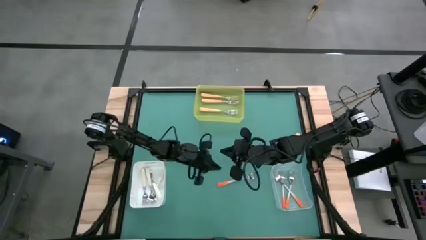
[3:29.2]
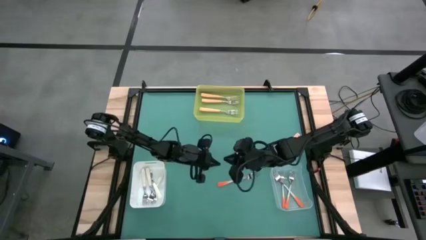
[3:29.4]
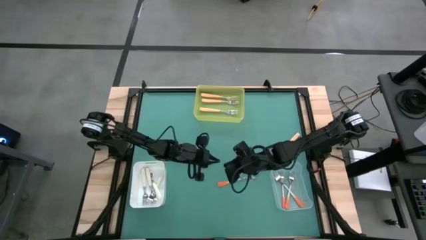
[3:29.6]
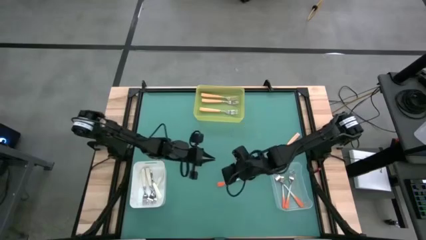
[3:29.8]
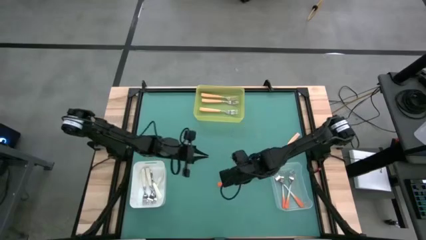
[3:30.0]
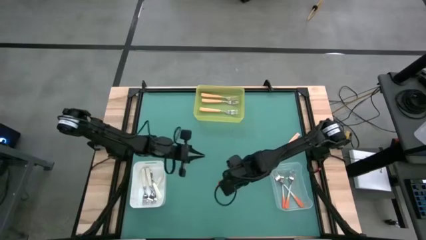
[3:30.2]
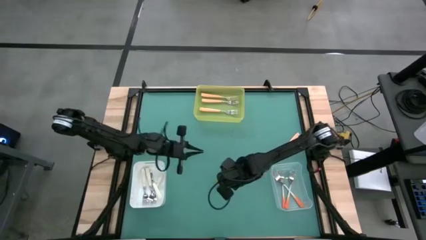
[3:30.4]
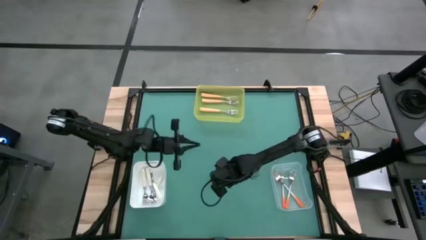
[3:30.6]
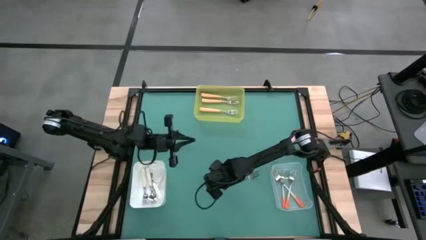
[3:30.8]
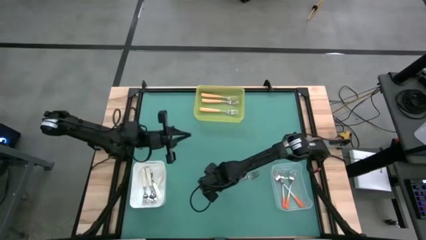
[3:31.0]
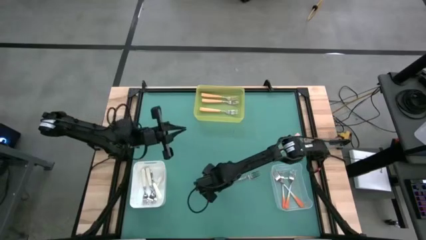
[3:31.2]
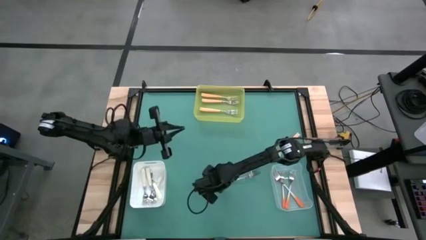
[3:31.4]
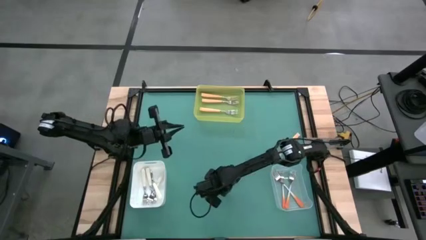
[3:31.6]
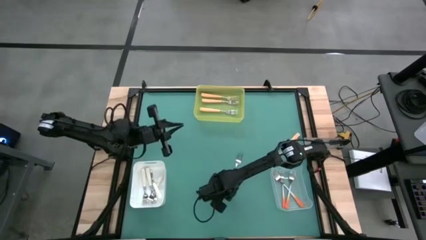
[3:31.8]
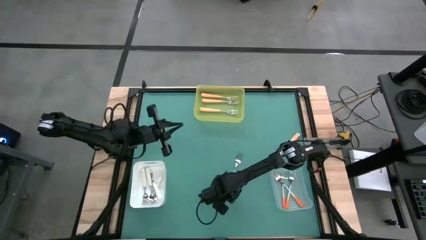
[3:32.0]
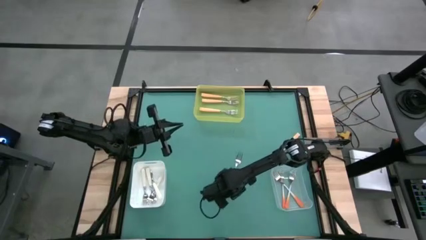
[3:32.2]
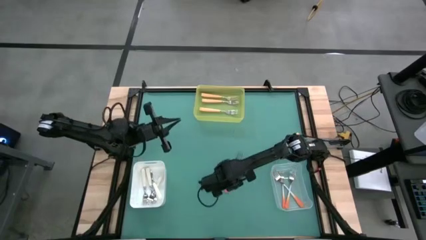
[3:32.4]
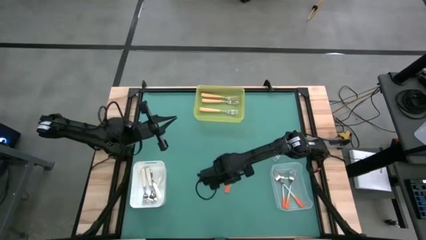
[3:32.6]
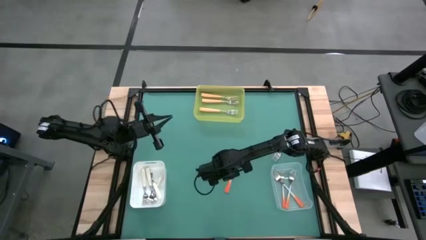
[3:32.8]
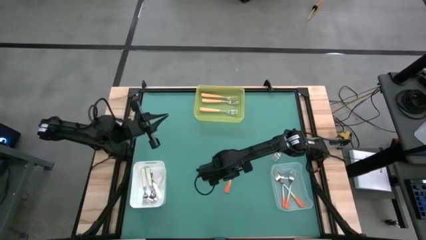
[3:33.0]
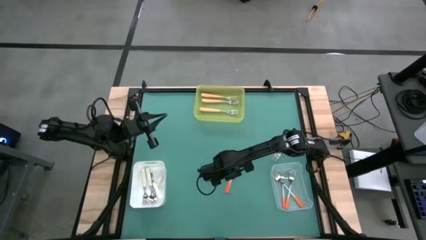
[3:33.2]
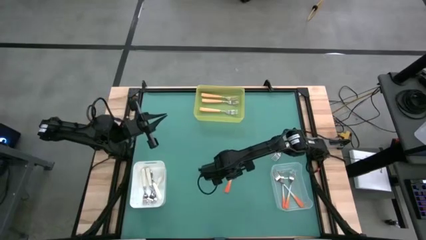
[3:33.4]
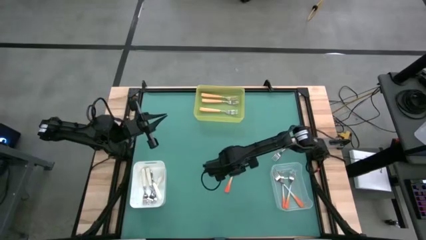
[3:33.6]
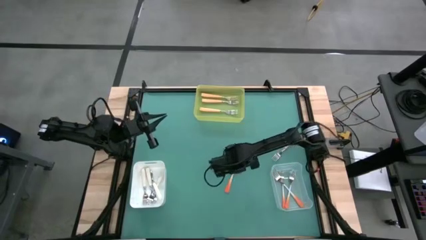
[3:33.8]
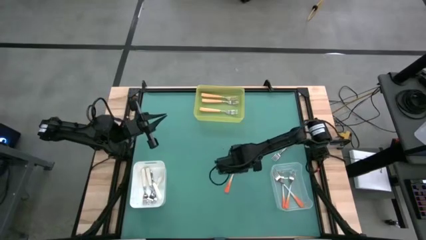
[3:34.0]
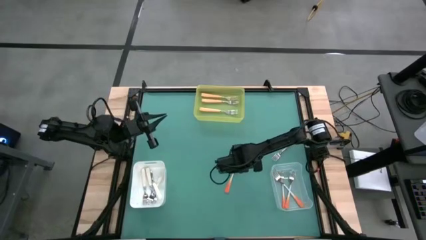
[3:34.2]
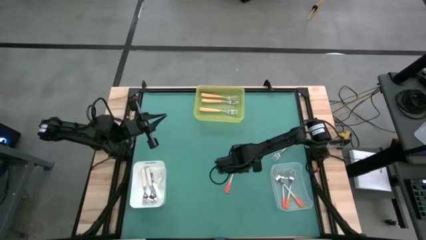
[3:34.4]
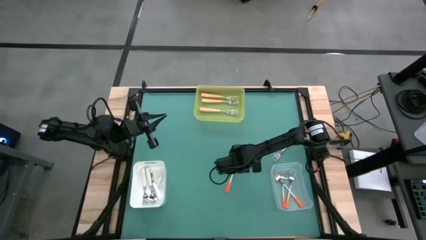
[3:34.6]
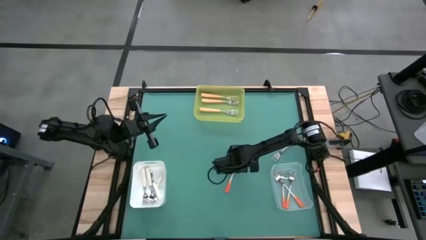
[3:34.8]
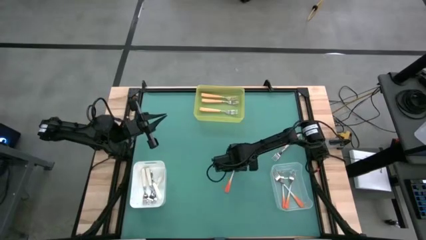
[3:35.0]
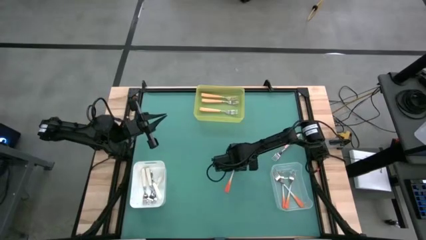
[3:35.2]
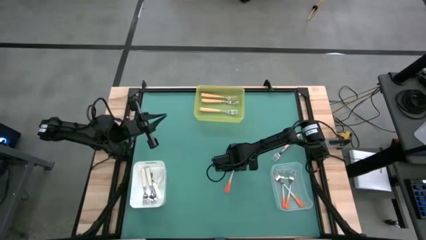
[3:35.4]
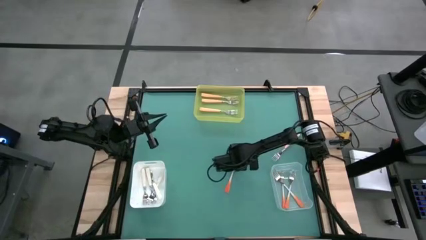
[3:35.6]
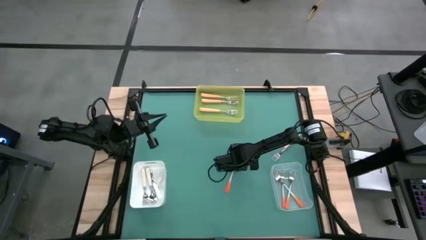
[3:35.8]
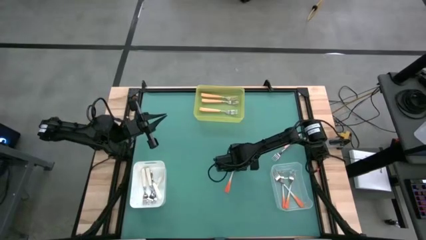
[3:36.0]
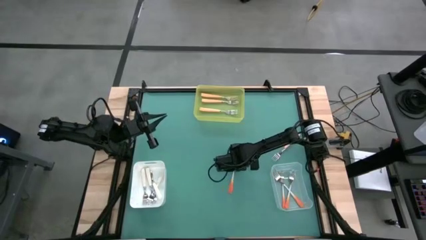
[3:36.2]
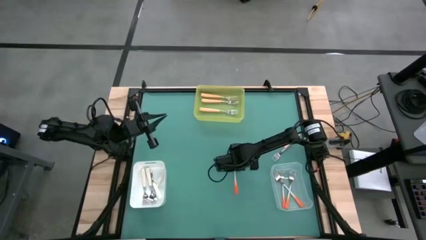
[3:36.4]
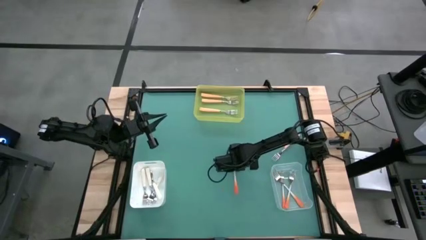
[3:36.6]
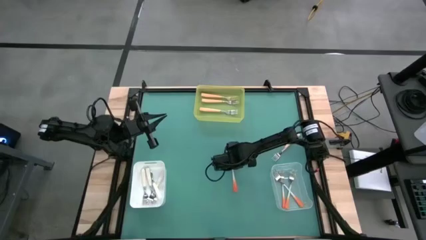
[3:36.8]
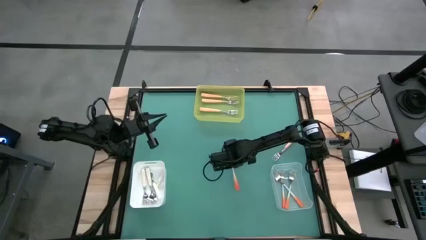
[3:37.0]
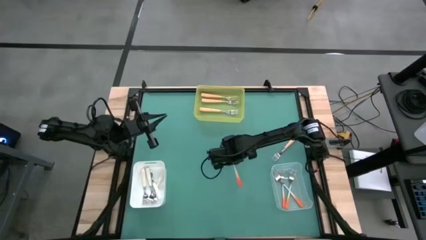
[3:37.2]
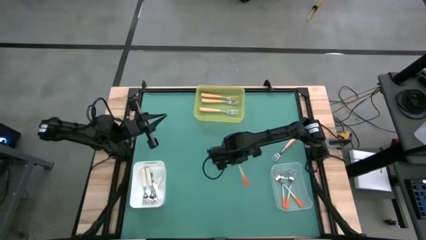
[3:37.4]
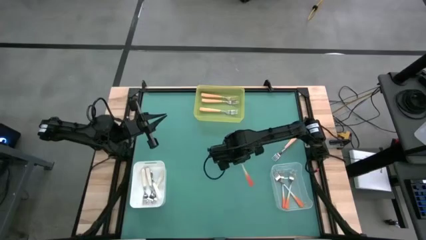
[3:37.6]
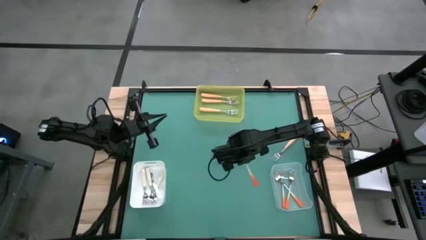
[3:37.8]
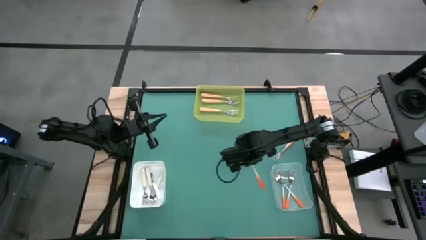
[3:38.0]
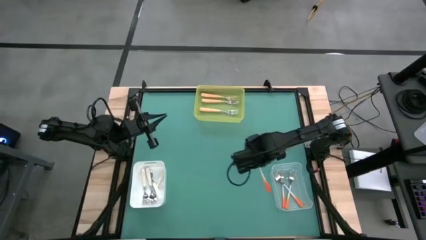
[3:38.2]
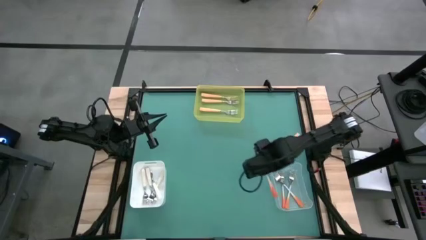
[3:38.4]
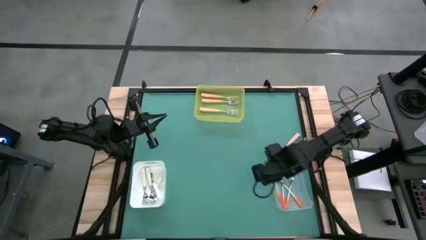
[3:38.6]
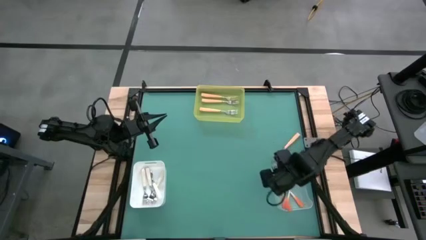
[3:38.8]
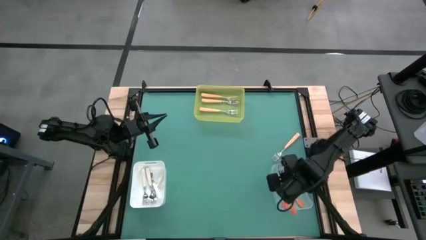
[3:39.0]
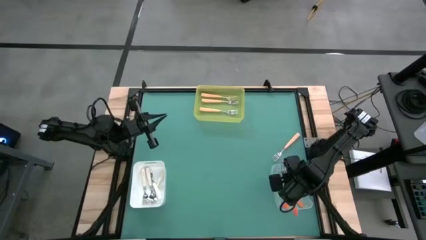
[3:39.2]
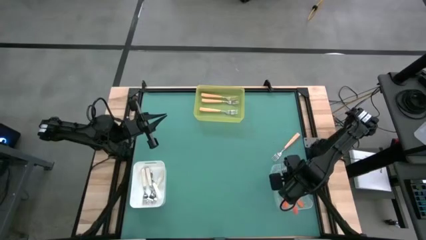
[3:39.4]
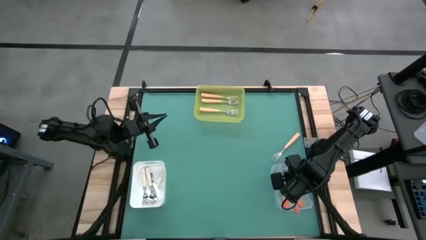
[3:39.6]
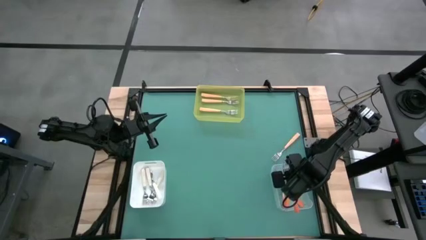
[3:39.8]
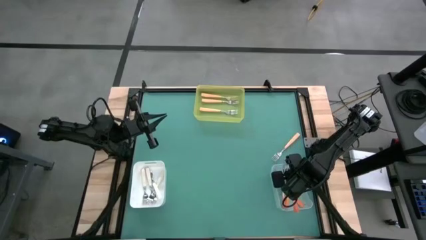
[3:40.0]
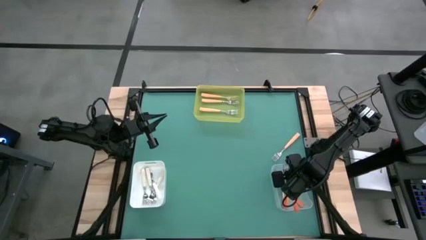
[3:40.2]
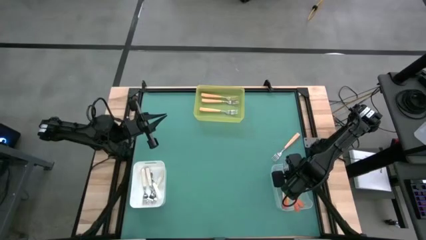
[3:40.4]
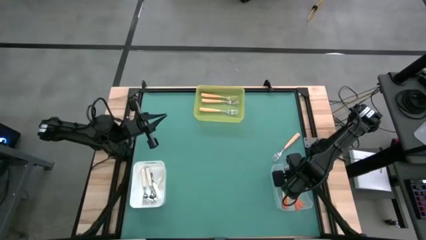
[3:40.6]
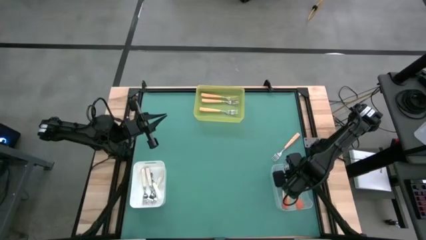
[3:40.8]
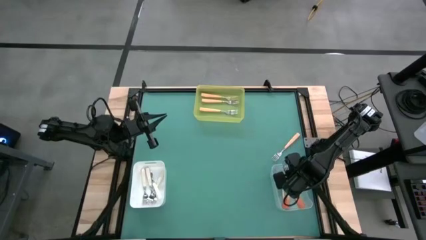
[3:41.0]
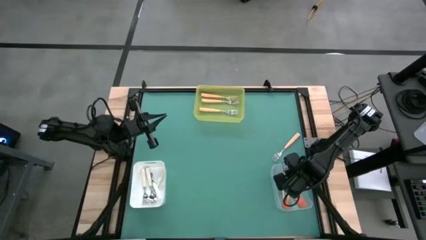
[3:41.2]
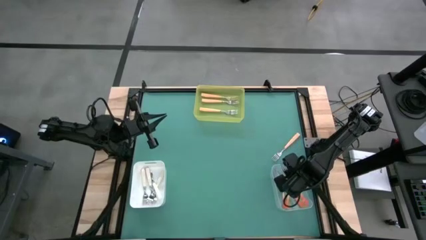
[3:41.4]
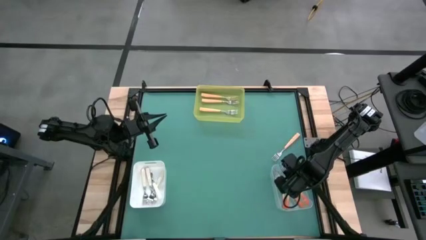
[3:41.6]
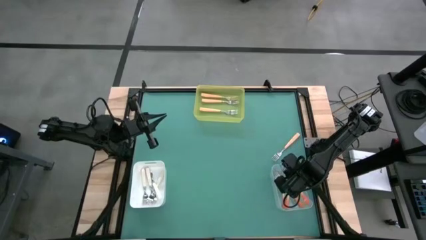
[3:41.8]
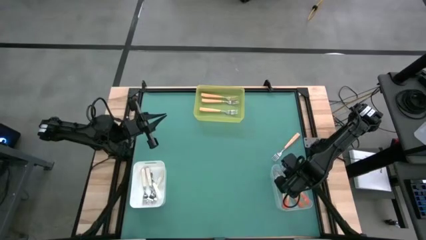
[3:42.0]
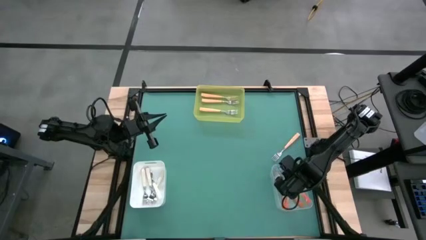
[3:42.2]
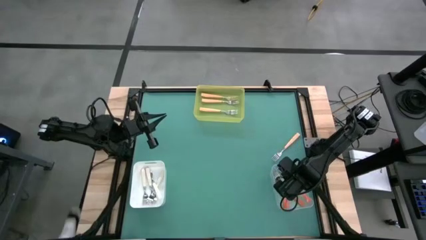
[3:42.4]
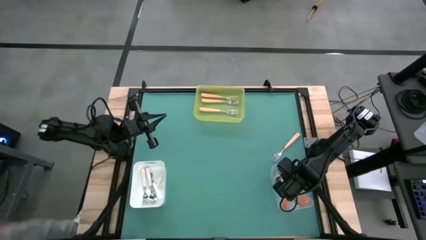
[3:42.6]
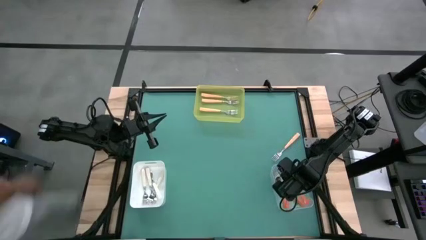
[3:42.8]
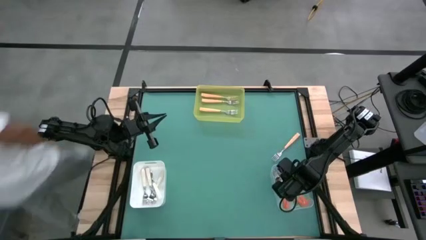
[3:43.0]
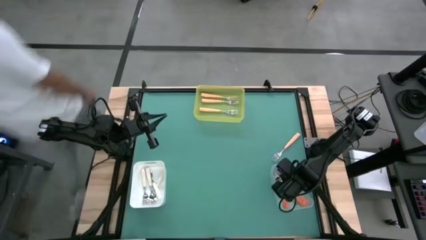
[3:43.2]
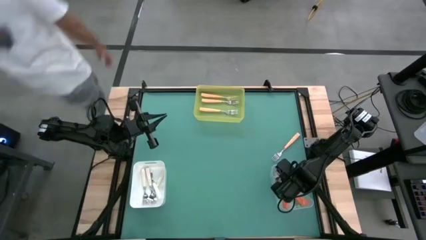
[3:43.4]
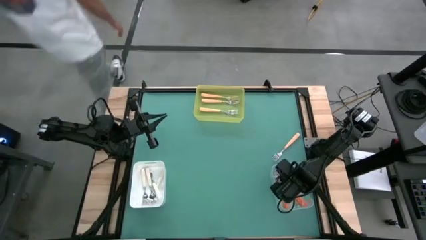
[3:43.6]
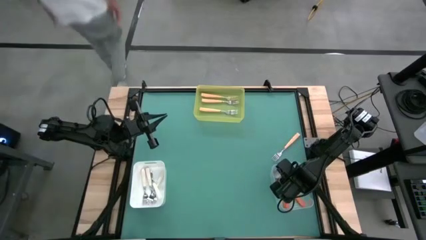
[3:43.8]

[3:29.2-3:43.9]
Task: Sort silverware by color (type)
Put the orange fork into the transparent bin
